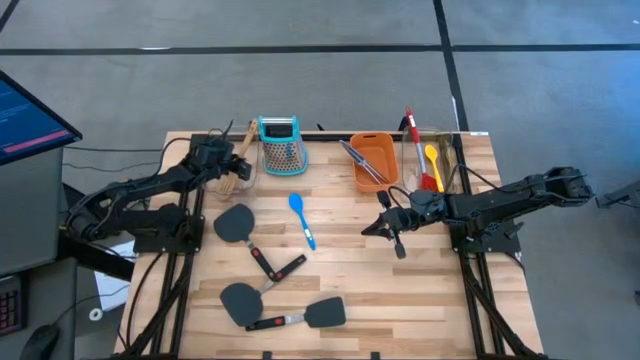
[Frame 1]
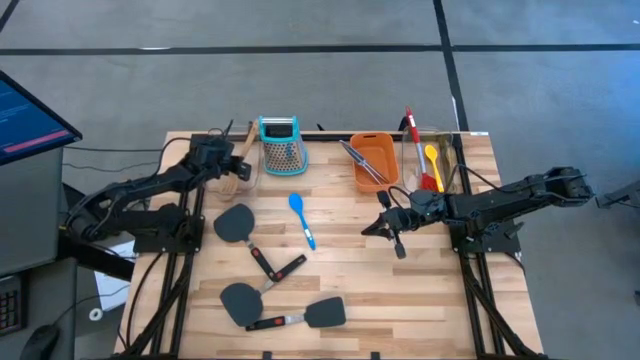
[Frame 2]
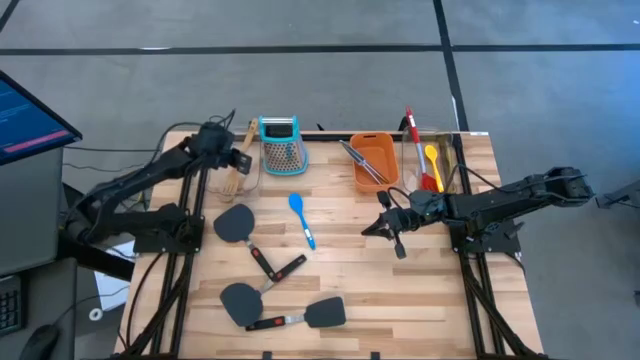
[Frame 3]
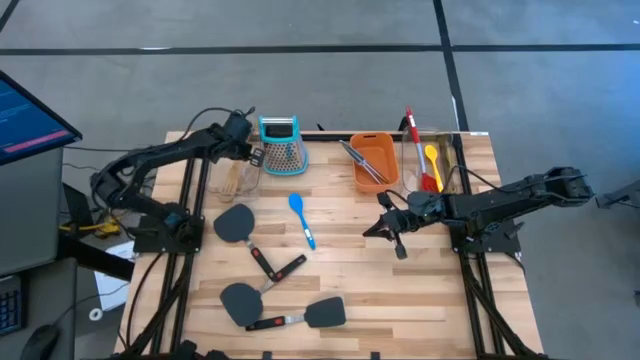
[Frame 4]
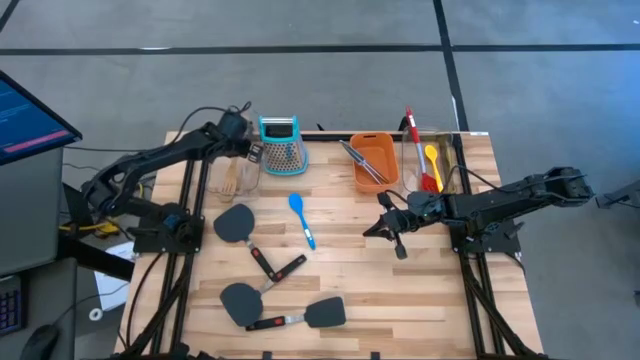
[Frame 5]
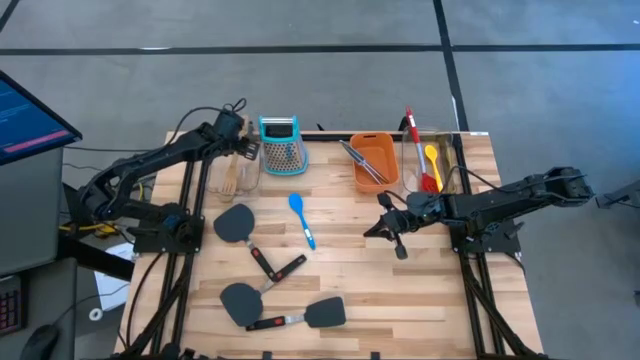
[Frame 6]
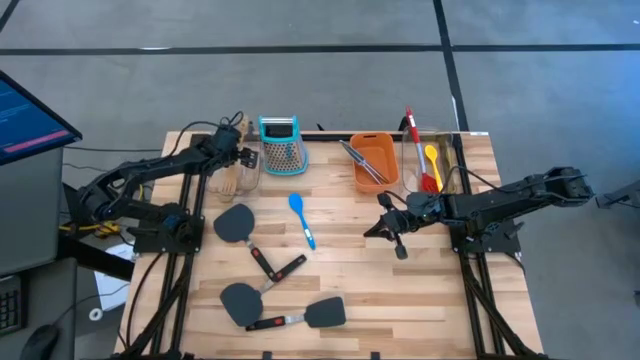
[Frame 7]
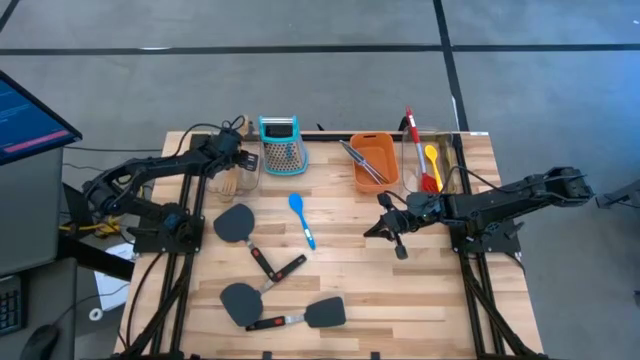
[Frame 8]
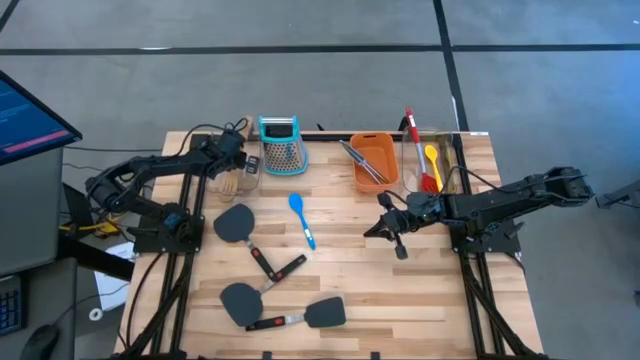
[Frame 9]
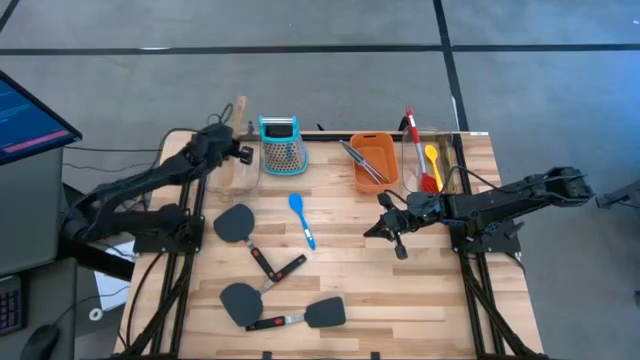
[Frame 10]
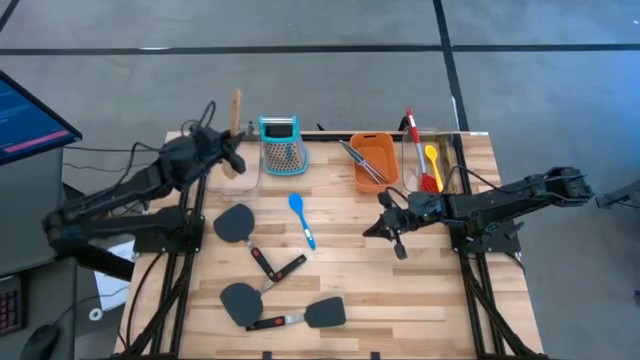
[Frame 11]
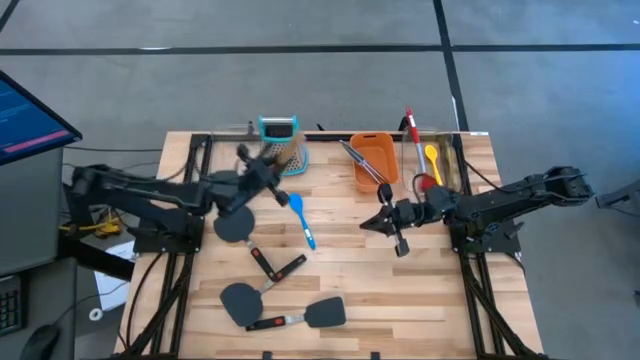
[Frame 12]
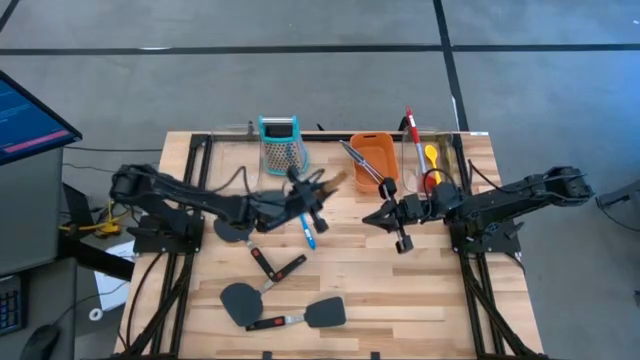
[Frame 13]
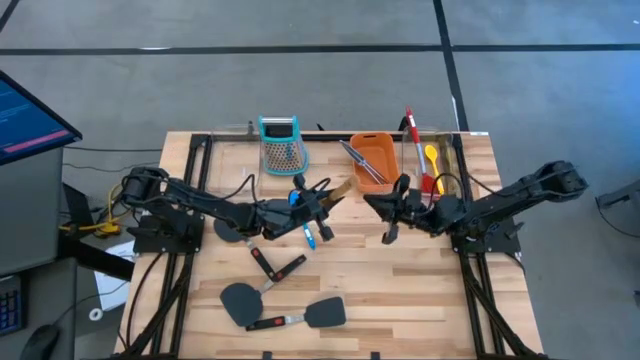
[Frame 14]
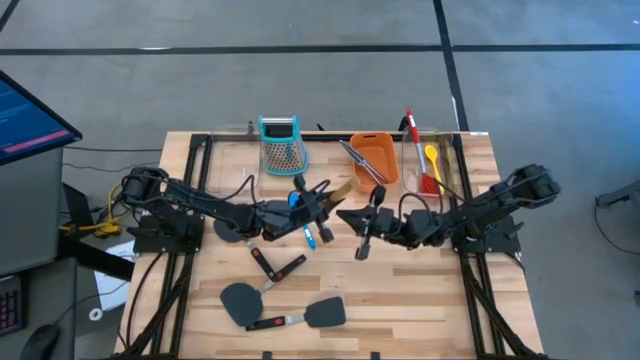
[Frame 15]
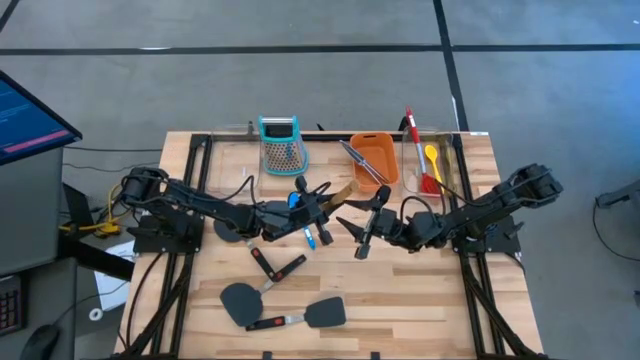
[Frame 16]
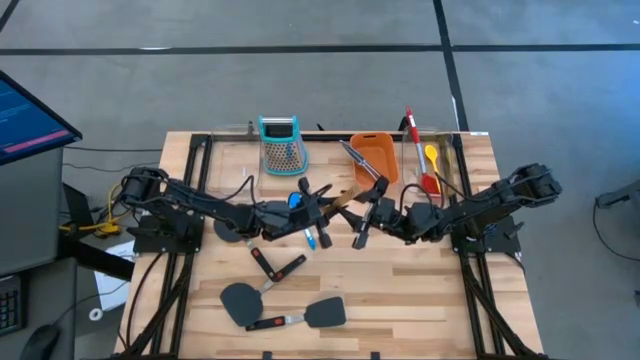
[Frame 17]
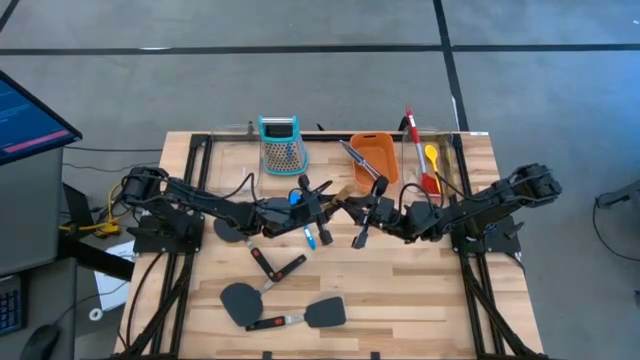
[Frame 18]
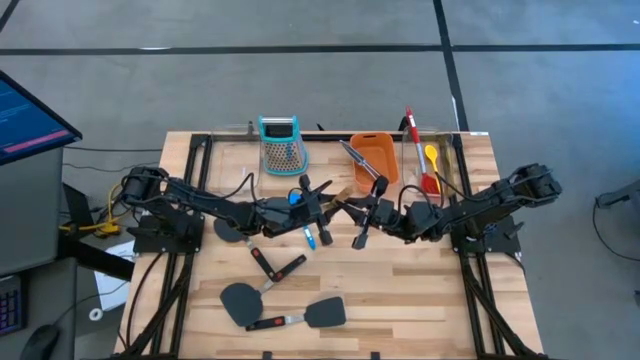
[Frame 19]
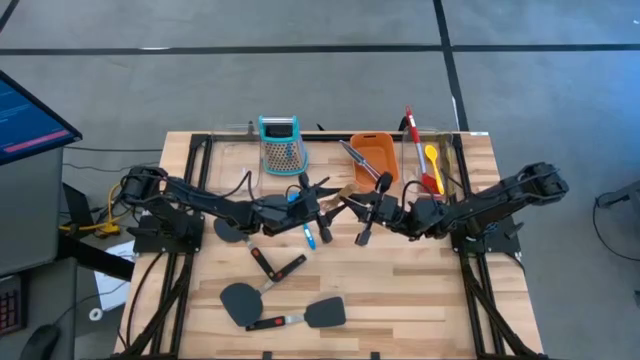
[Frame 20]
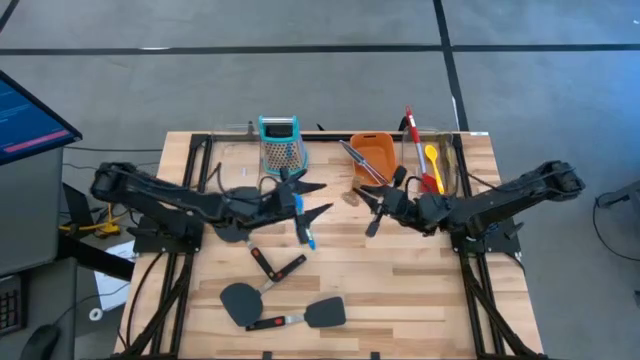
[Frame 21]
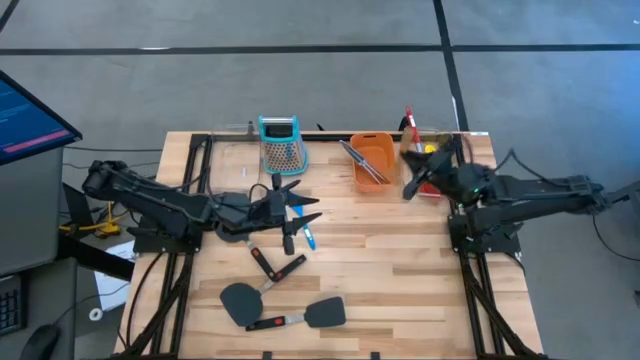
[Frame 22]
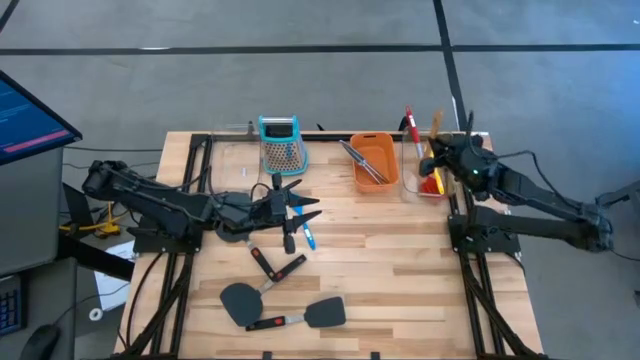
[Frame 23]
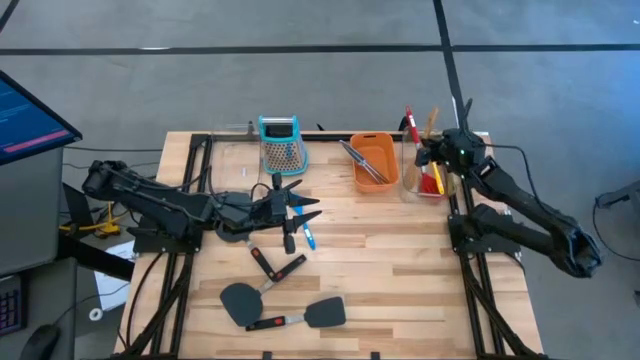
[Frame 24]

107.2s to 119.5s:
Task: Pick & Place Kitchen Items
Put the brown spatula into the right transparent bin

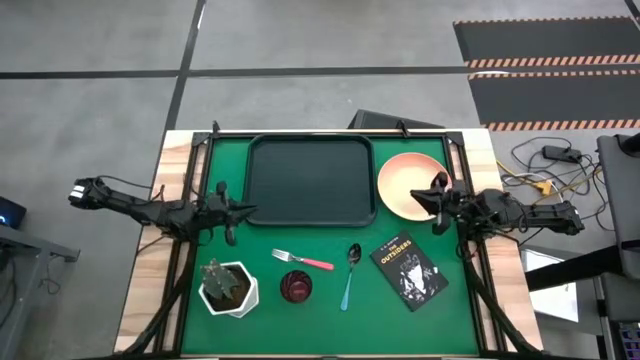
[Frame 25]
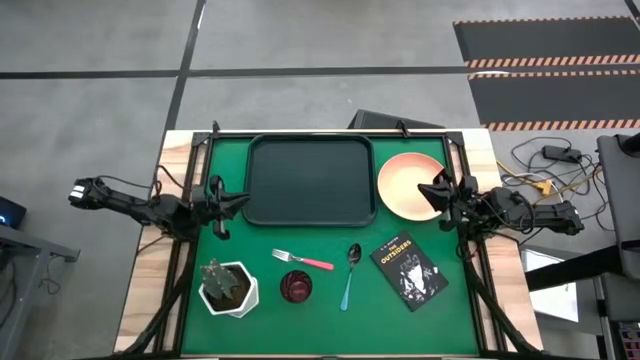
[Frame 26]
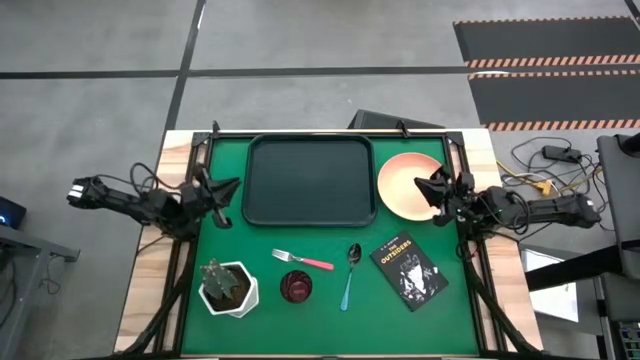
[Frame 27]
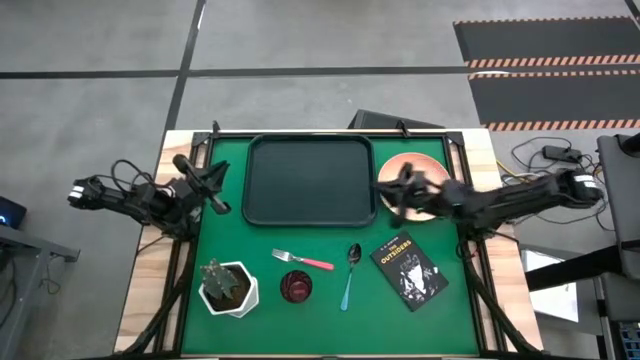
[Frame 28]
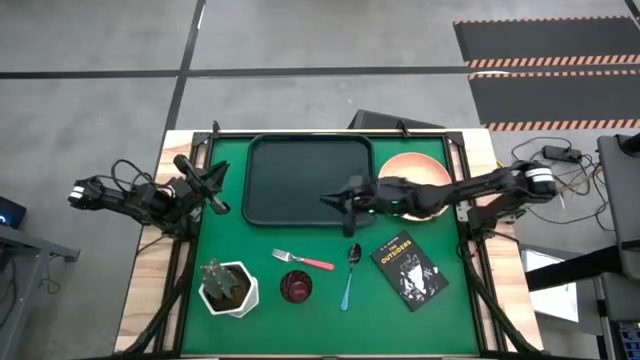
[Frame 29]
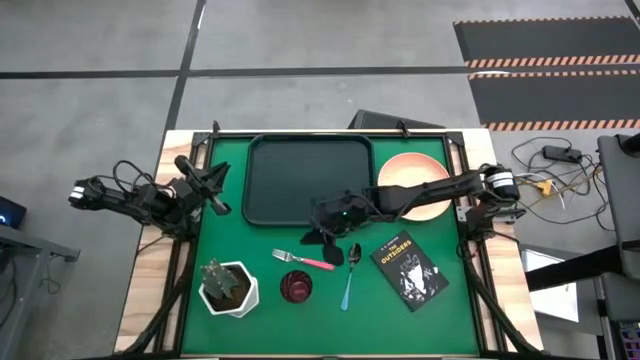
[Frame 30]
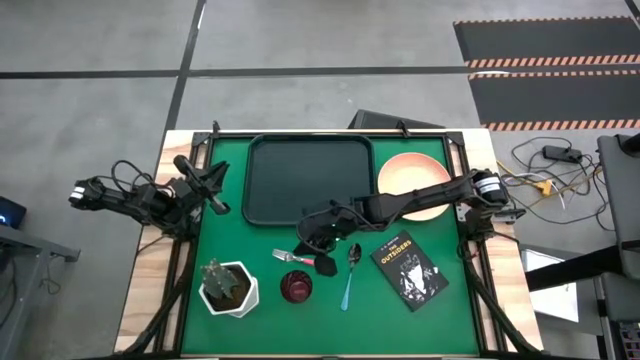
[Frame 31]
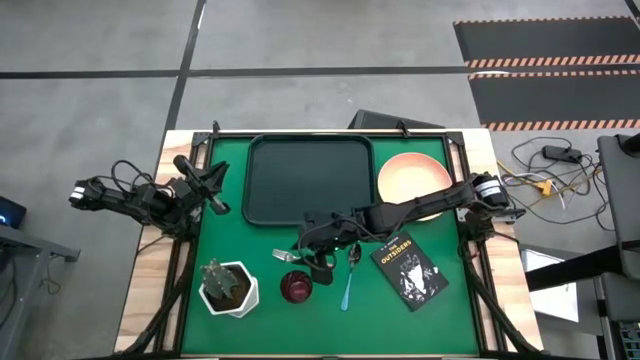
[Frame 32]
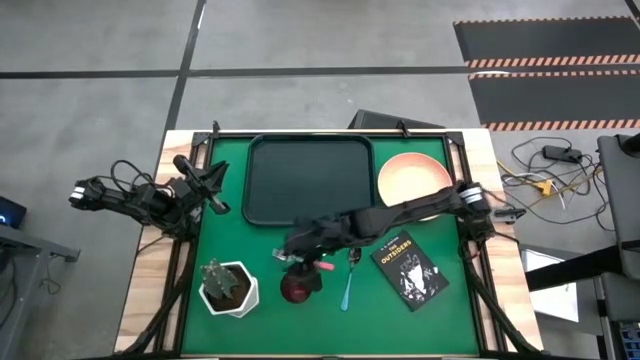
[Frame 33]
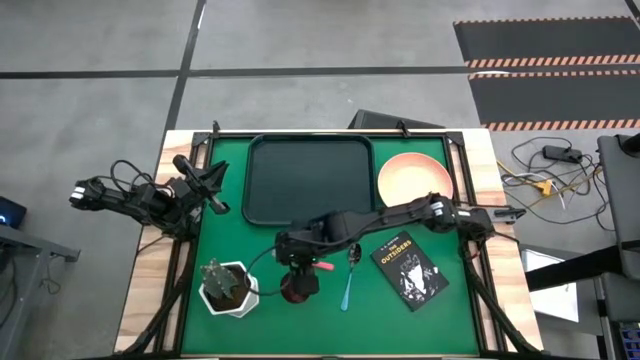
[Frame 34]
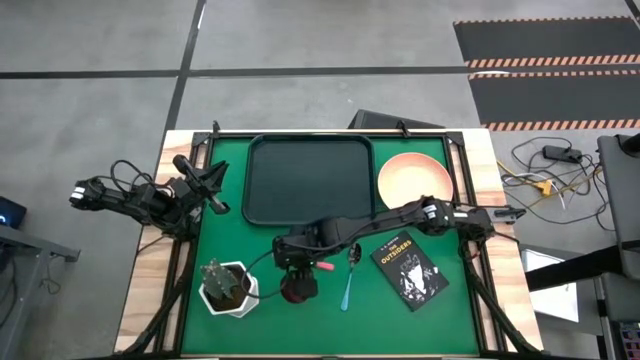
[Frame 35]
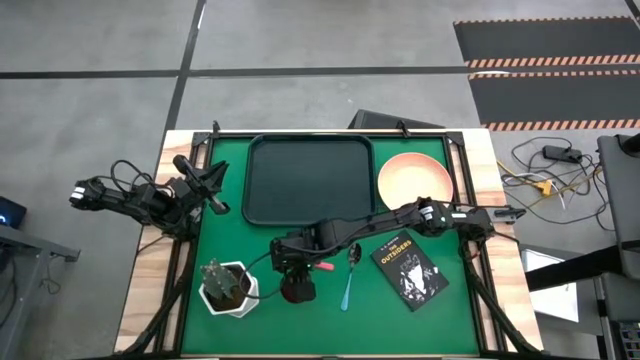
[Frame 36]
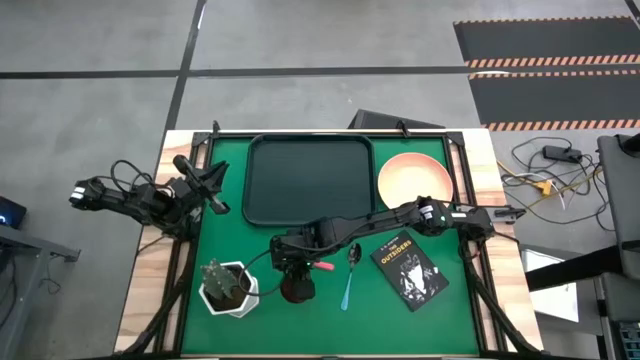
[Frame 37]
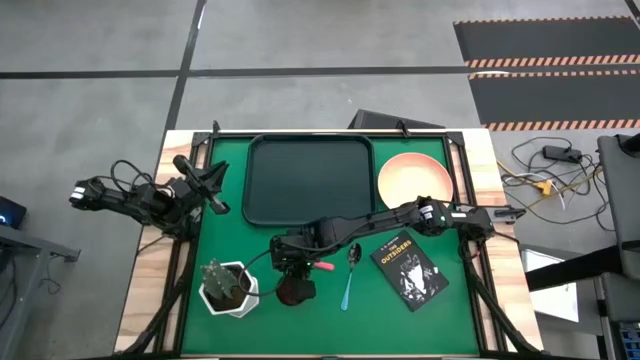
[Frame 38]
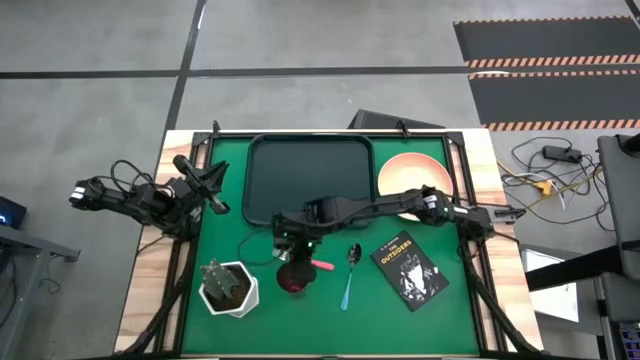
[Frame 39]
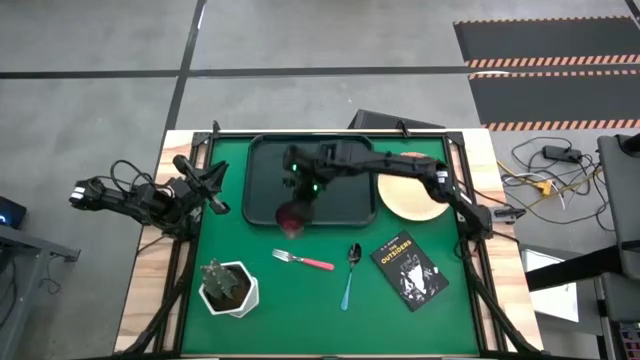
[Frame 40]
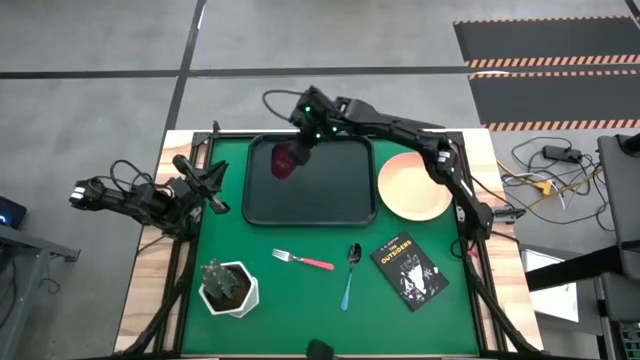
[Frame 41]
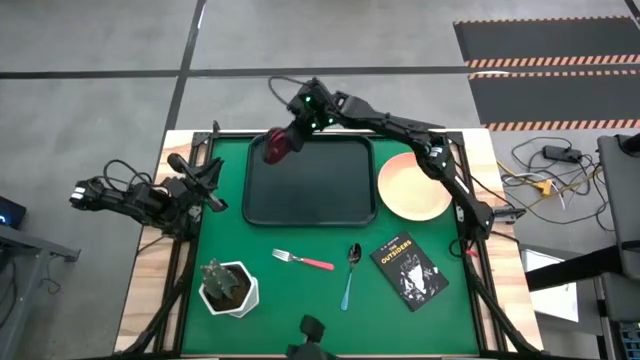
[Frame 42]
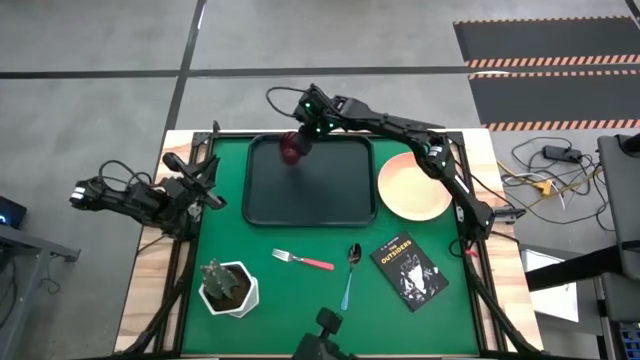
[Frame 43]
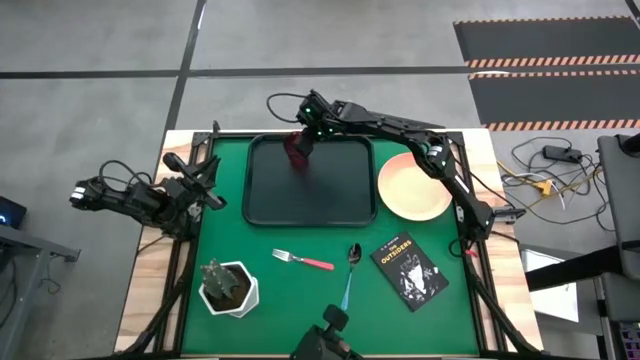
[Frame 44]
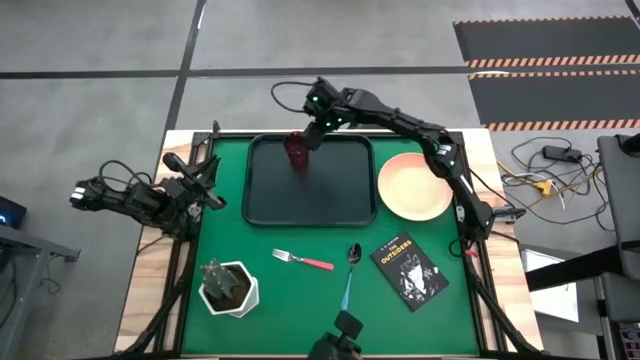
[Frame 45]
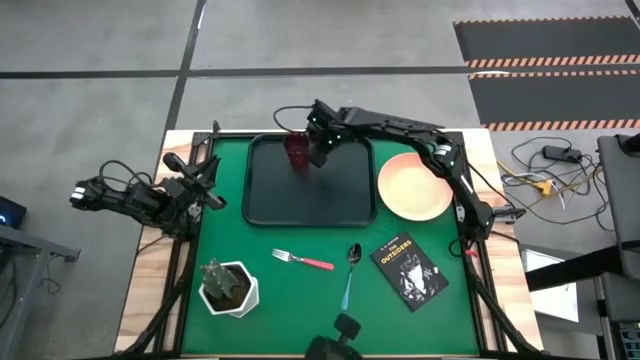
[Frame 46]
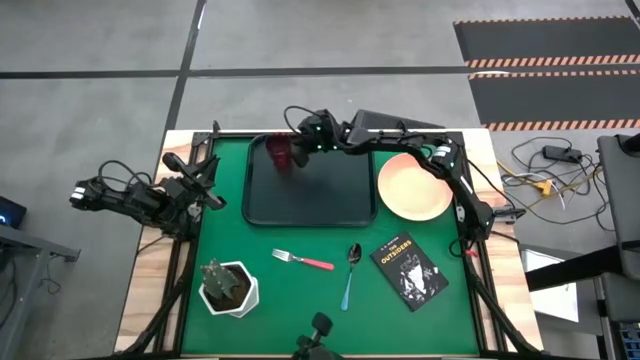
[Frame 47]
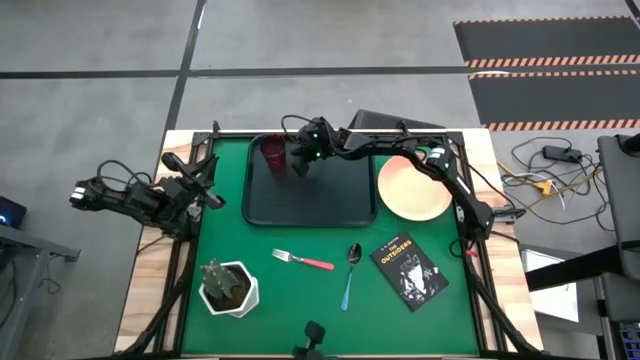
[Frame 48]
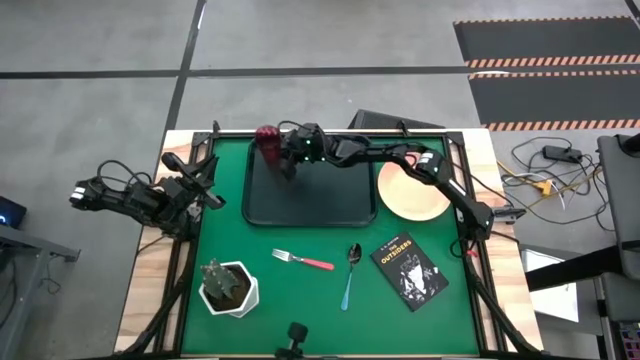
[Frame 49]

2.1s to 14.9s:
Task: Pick and place plate/cup/fork/spoon on tray
Put the red cup on the black tray
